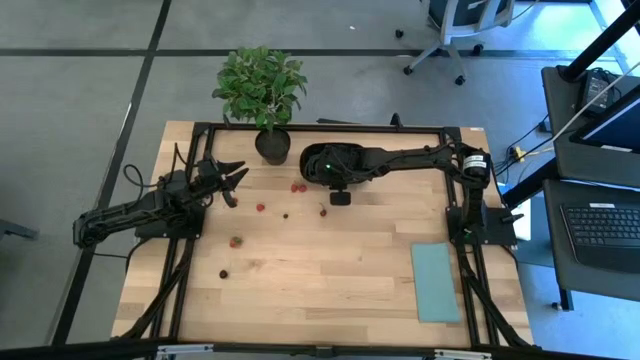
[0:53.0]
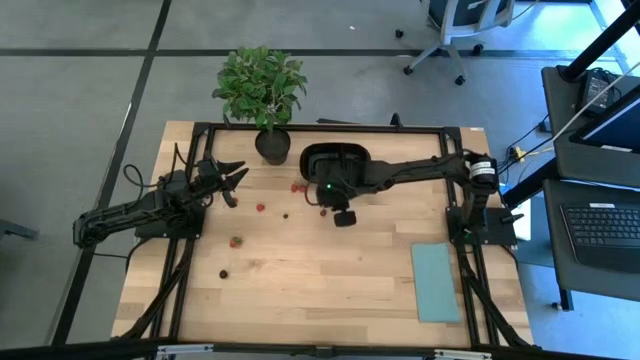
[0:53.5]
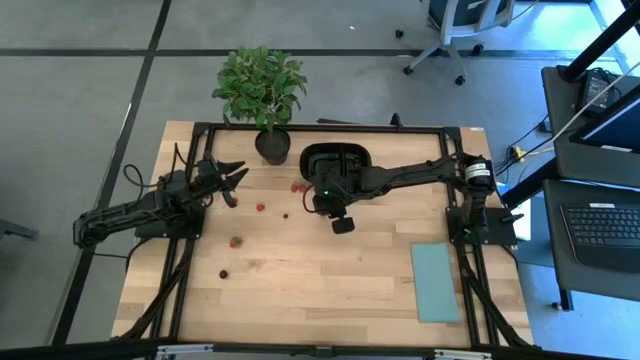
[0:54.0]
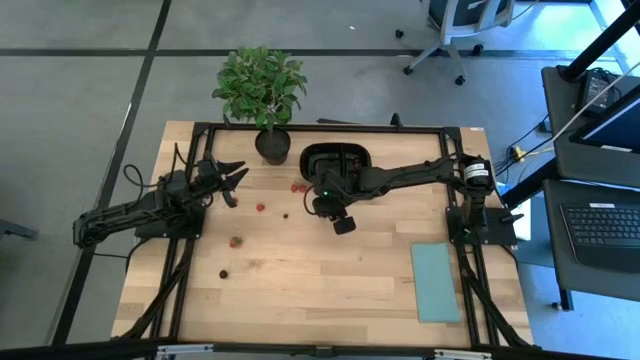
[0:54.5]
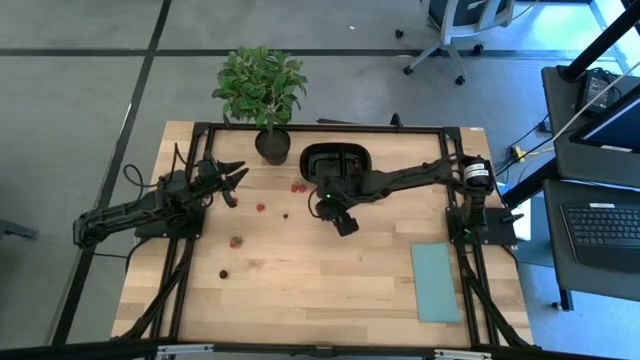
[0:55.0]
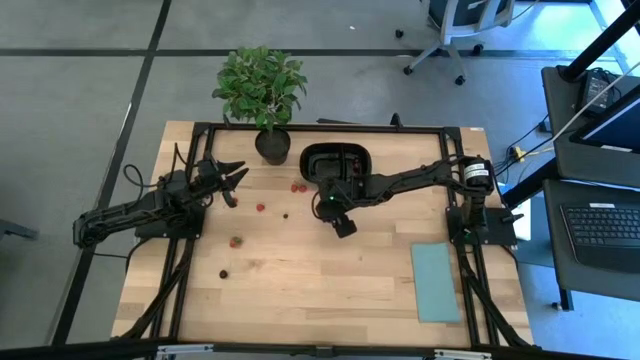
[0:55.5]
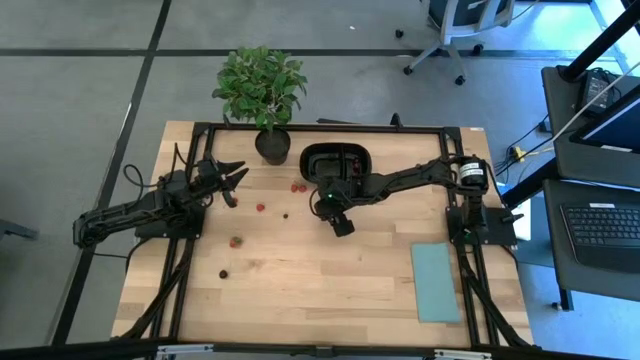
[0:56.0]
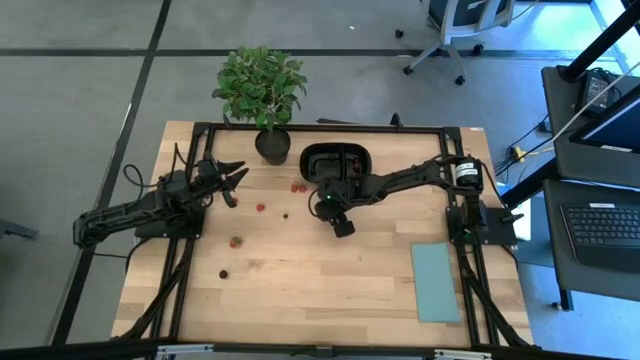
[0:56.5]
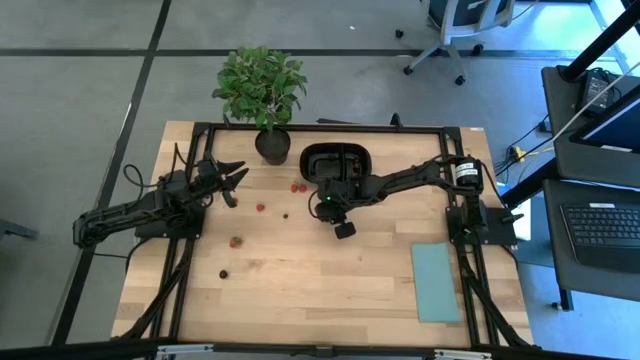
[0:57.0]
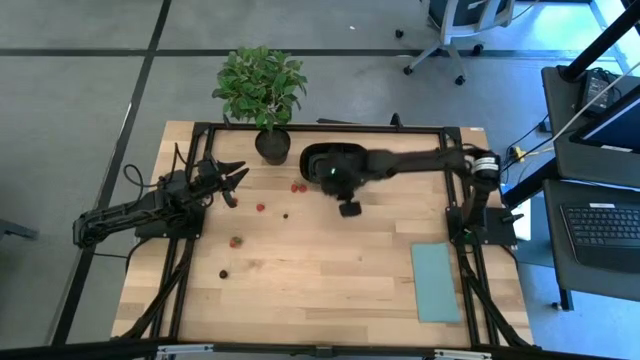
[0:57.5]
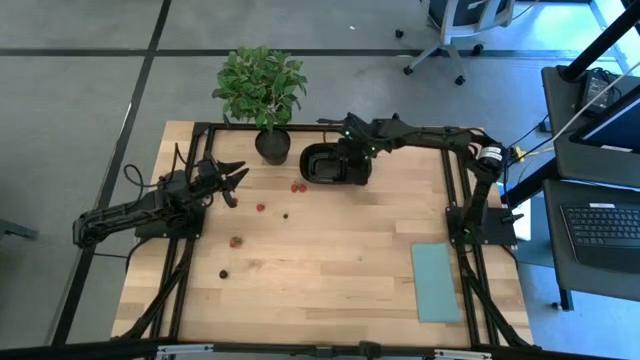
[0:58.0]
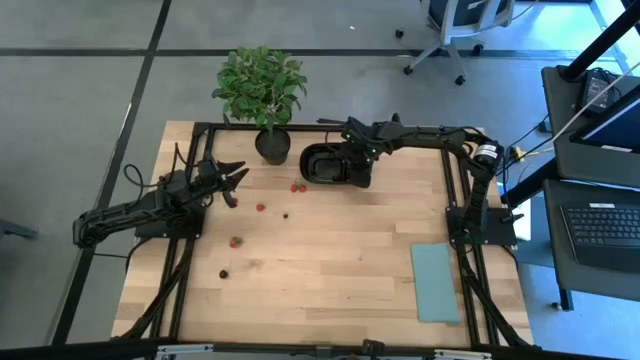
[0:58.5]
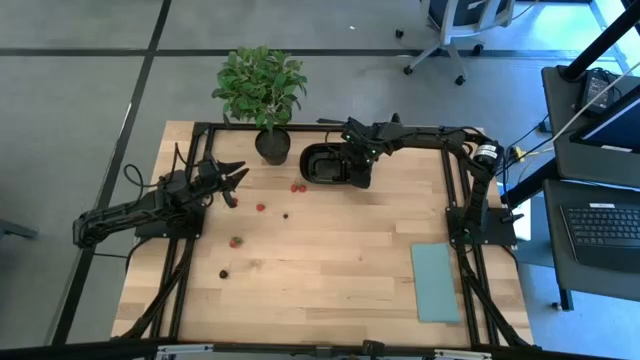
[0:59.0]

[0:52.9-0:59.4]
Task: Pick and placing Produce into tupperware
Put the red cherry into the black container

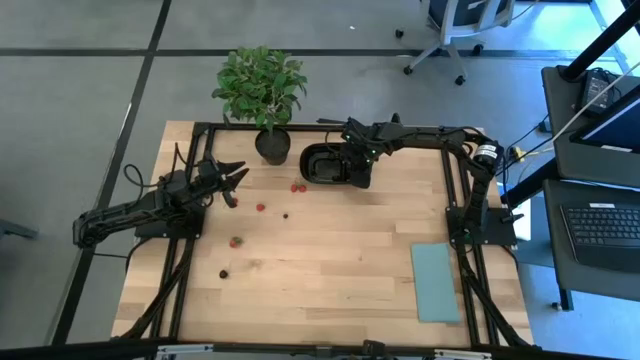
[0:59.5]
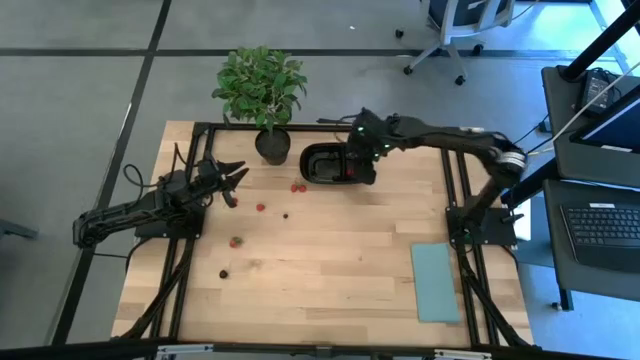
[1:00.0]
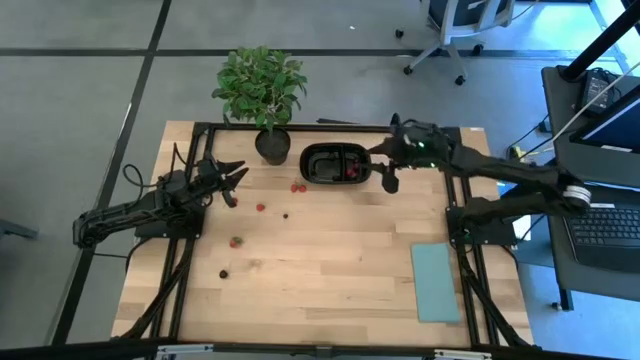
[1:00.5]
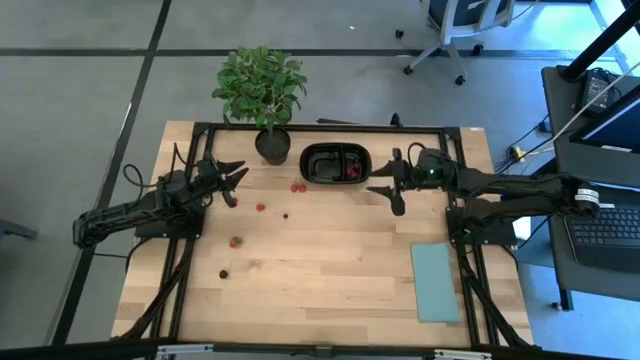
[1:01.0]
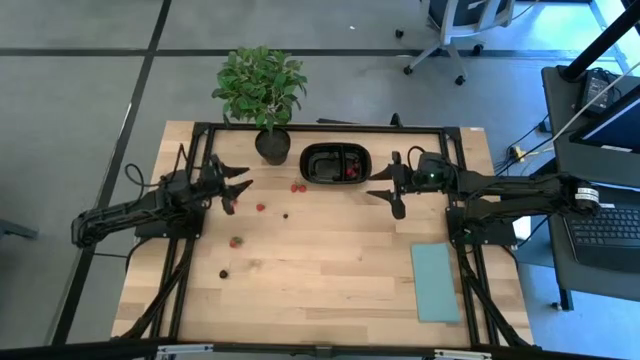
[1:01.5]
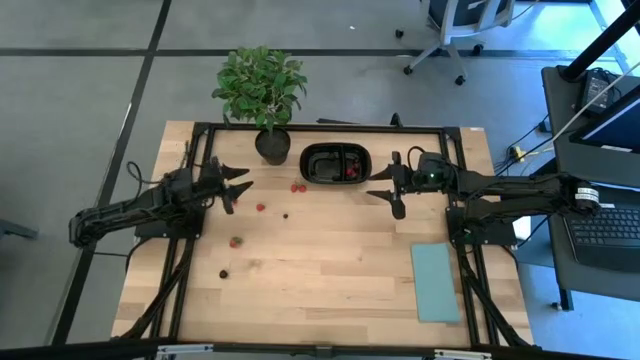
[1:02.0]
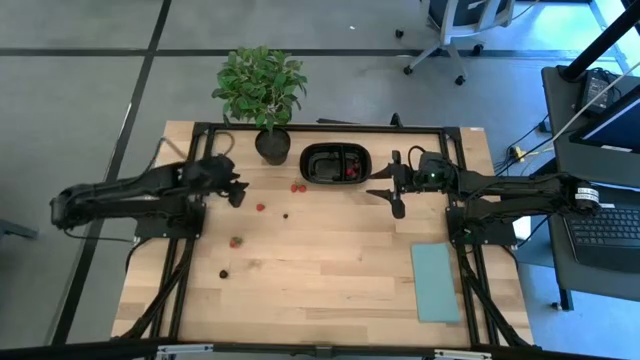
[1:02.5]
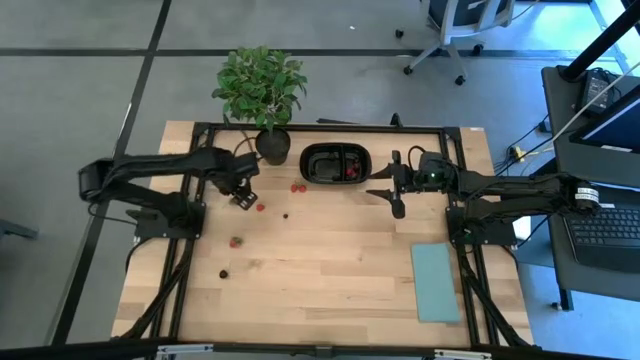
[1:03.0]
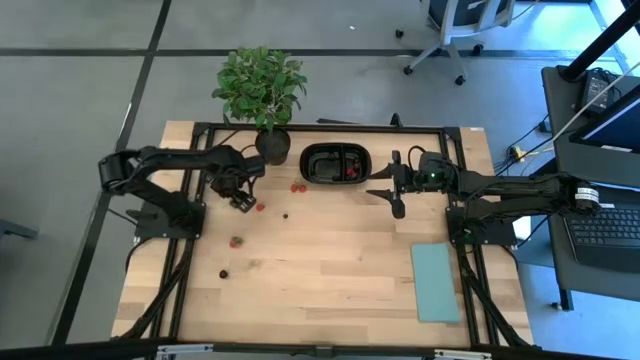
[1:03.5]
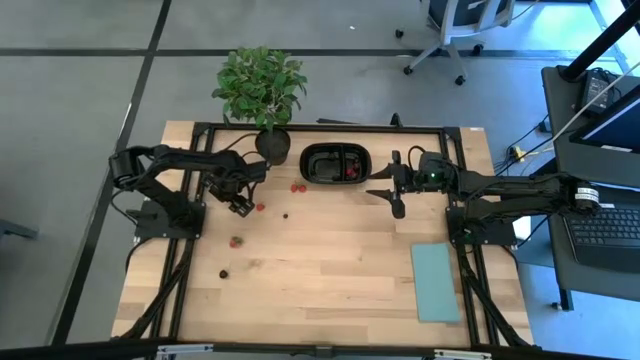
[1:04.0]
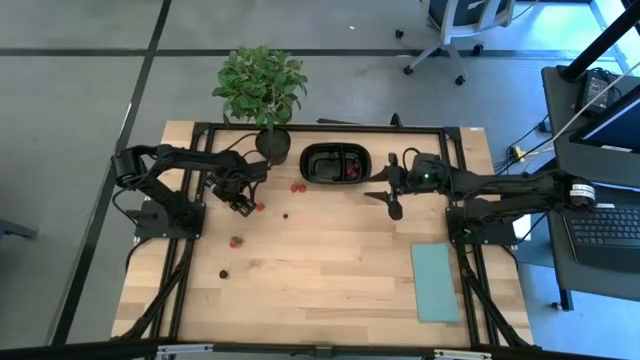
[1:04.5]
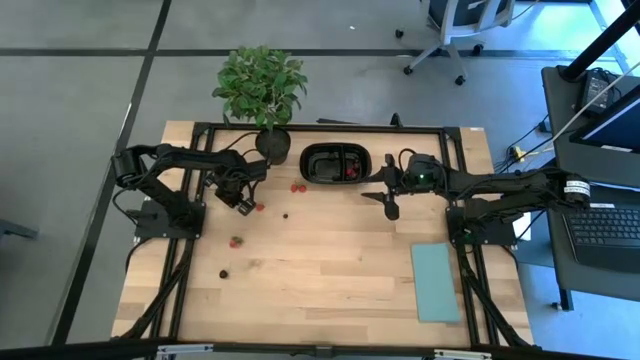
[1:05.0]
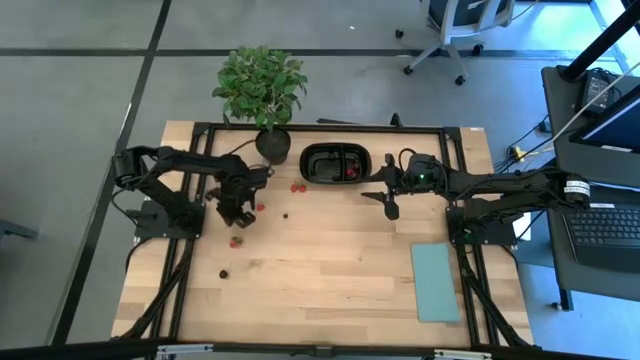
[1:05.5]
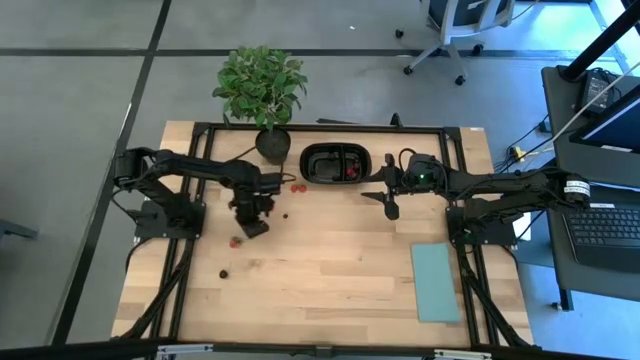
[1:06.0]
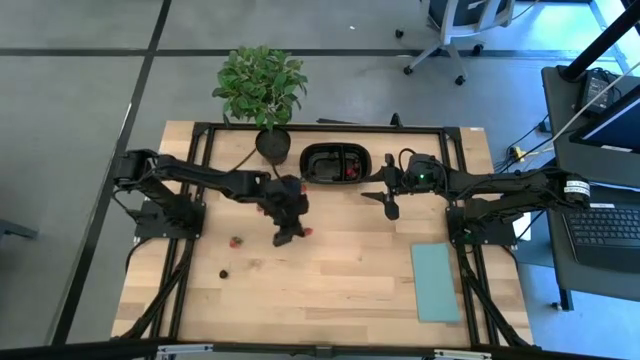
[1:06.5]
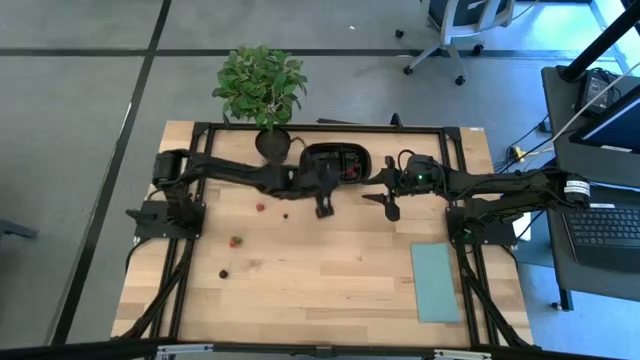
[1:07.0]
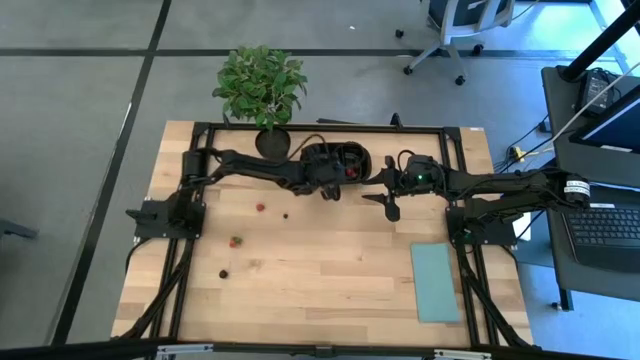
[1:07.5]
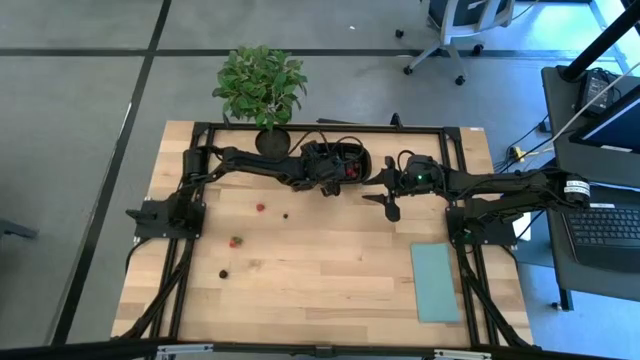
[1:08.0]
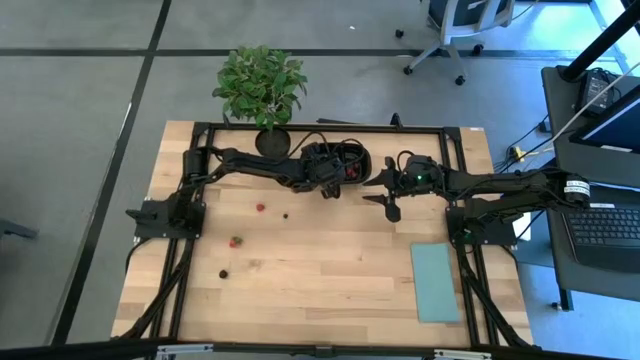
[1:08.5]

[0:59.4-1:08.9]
Put the top left strawberry into the black container

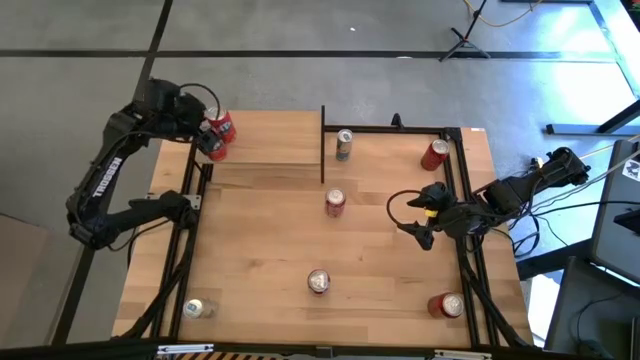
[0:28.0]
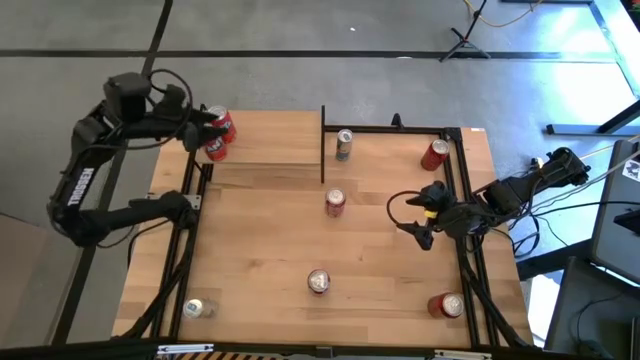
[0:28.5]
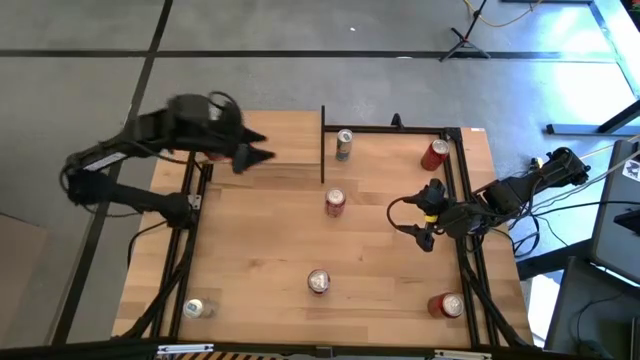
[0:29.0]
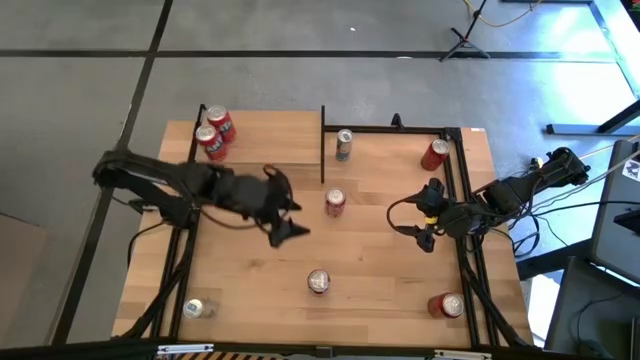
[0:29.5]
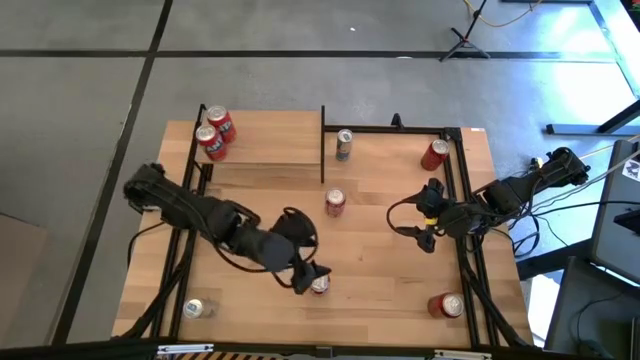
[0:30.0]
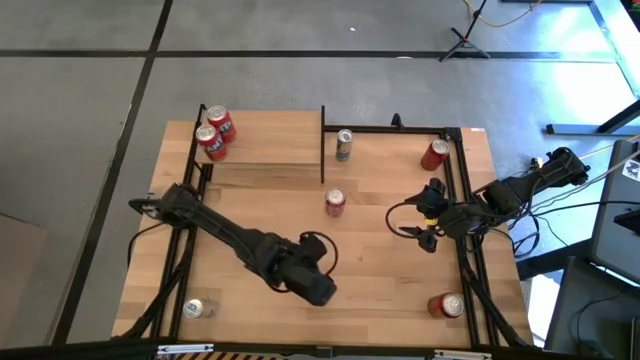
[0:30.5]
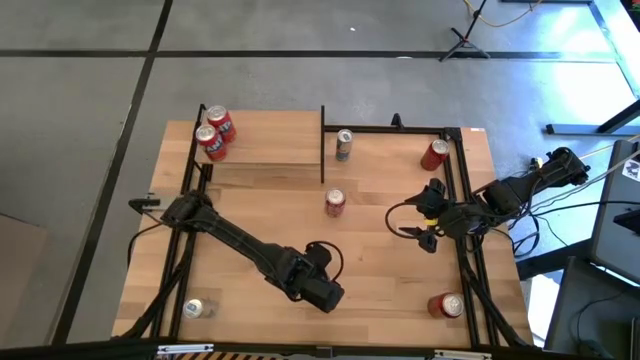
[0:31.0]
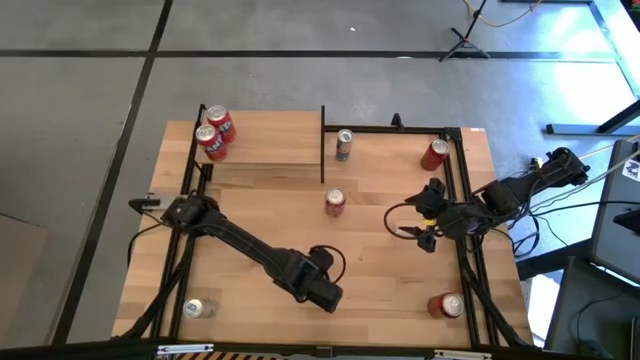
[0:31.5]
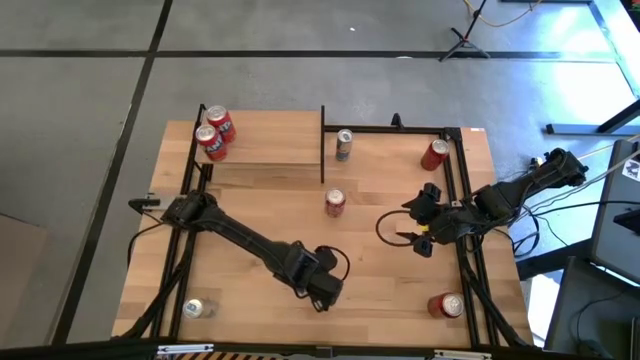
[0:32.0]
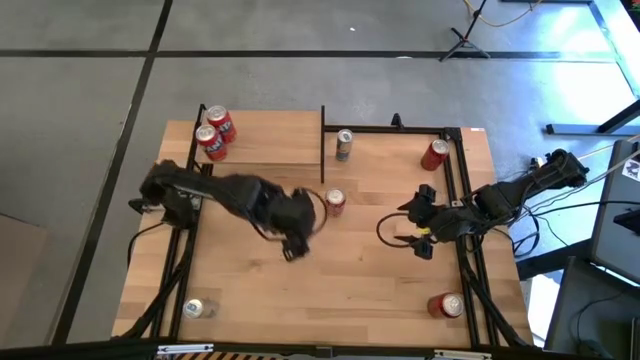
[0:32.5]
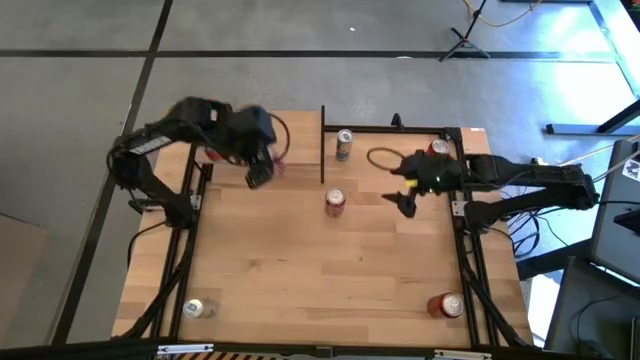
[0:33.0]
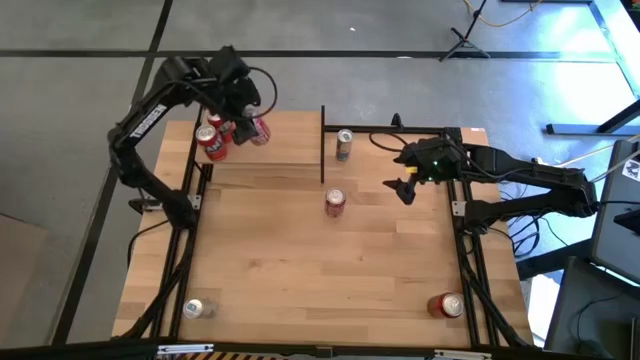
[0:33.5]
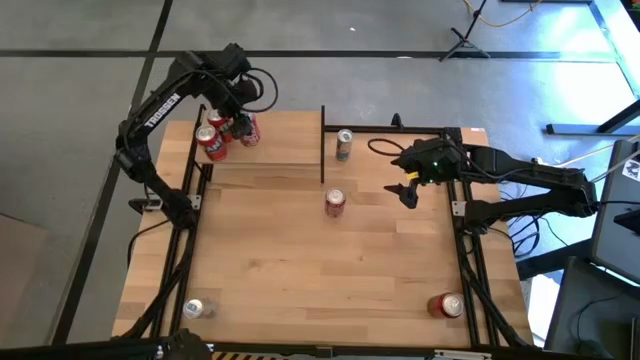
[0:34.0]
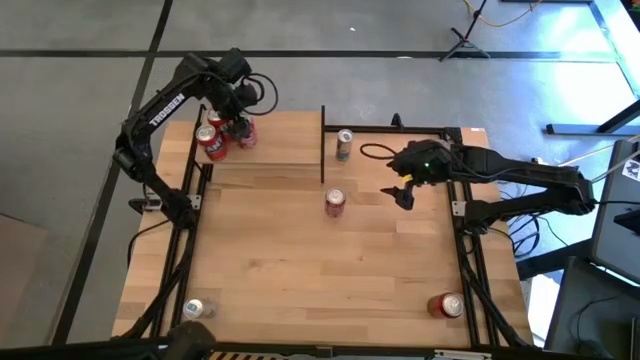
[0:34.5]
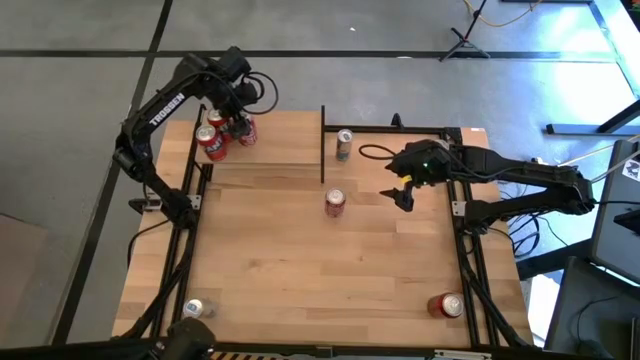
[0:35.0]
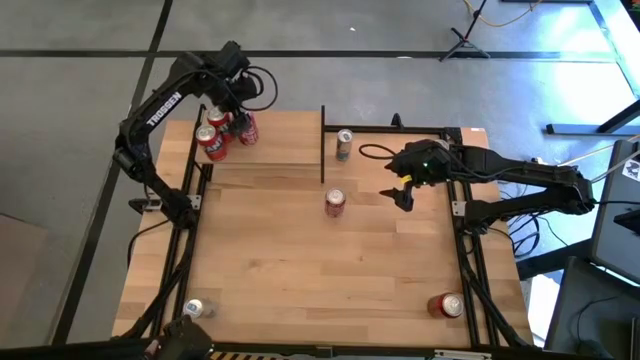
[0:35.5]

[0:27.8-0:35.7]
Task: Place canned beverage on shelf
Put the bottom red-white soda can on the shelf
